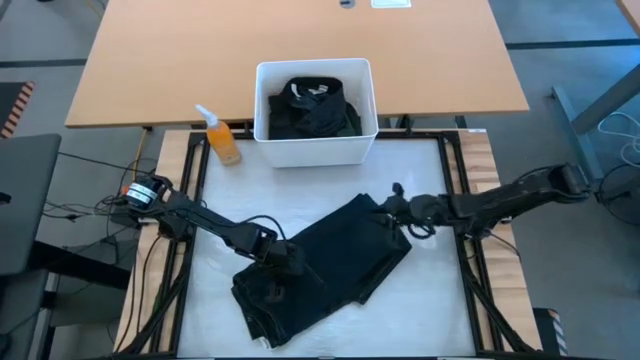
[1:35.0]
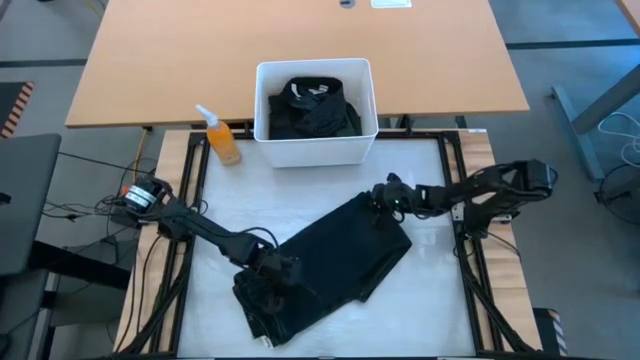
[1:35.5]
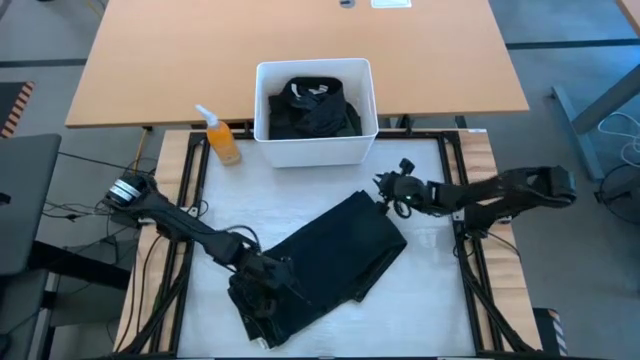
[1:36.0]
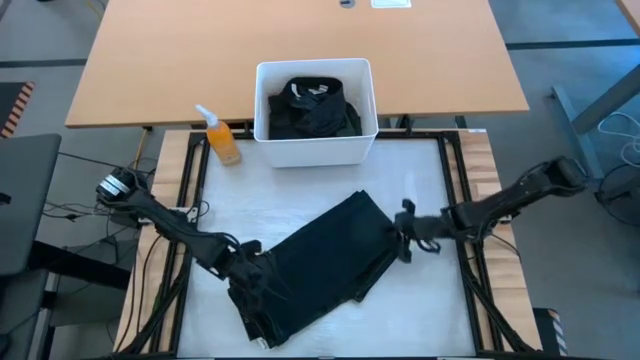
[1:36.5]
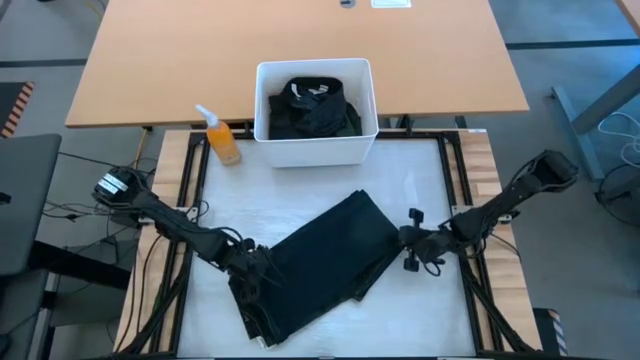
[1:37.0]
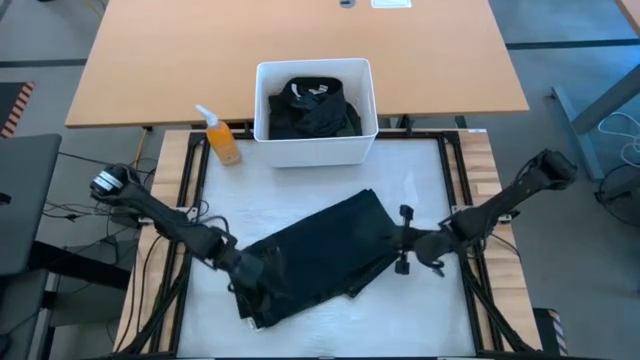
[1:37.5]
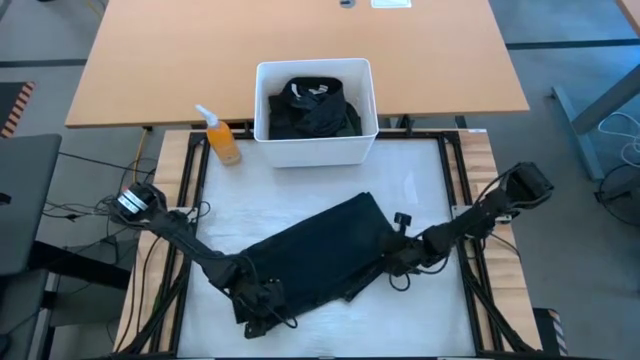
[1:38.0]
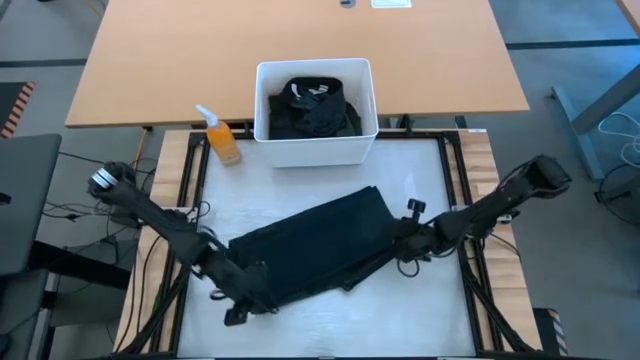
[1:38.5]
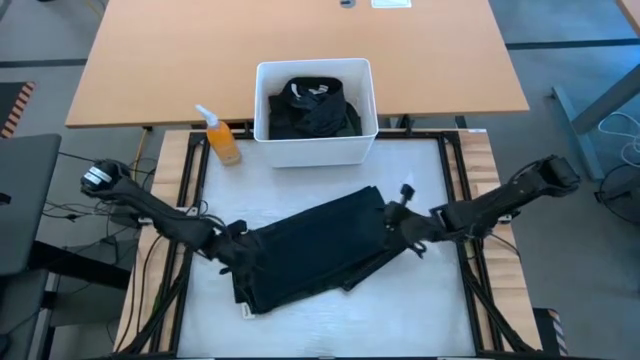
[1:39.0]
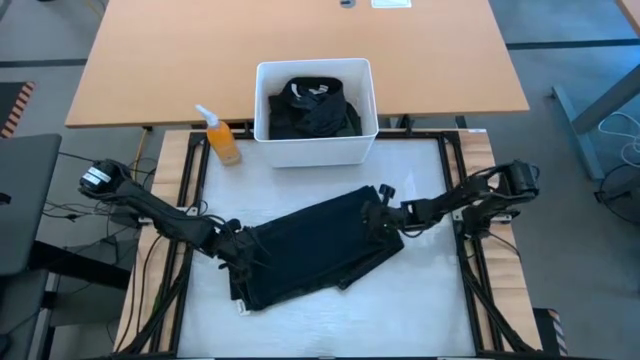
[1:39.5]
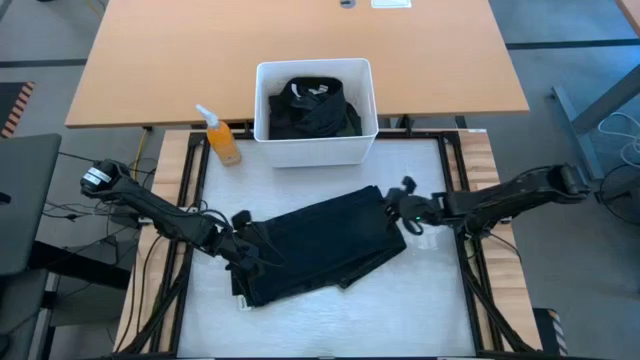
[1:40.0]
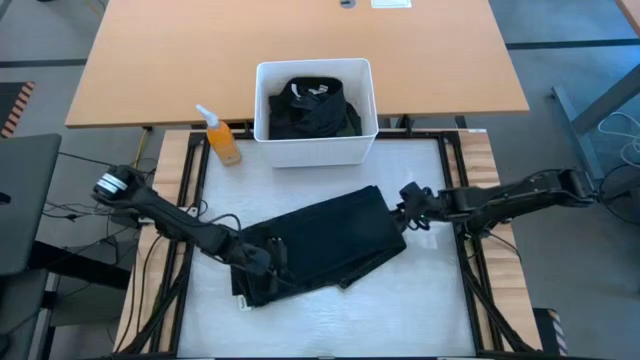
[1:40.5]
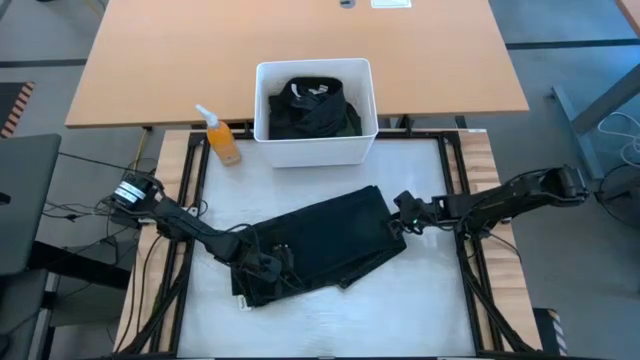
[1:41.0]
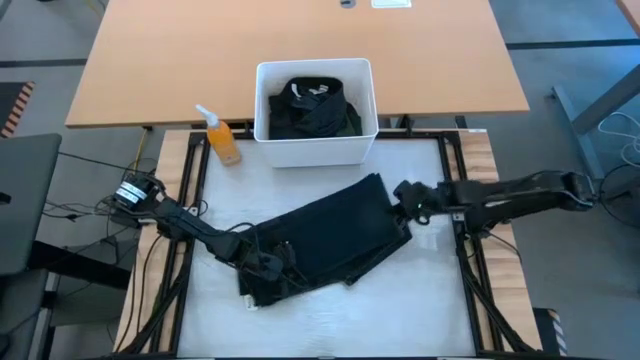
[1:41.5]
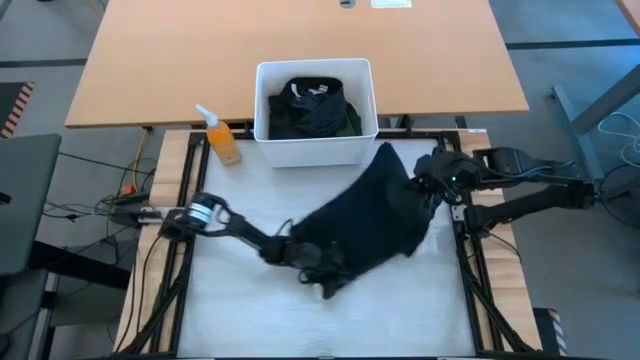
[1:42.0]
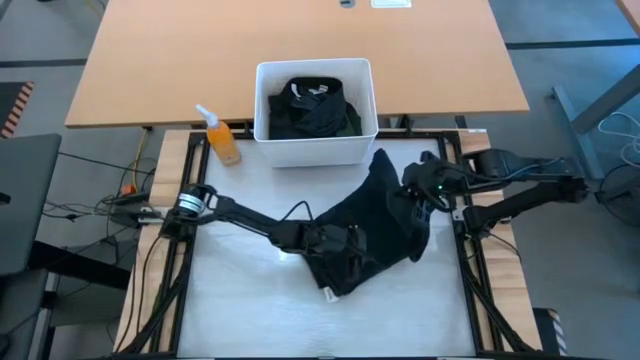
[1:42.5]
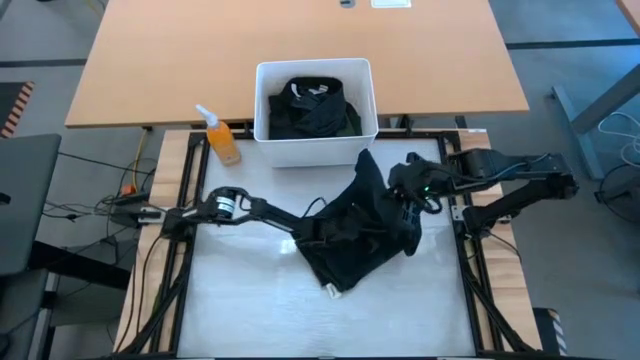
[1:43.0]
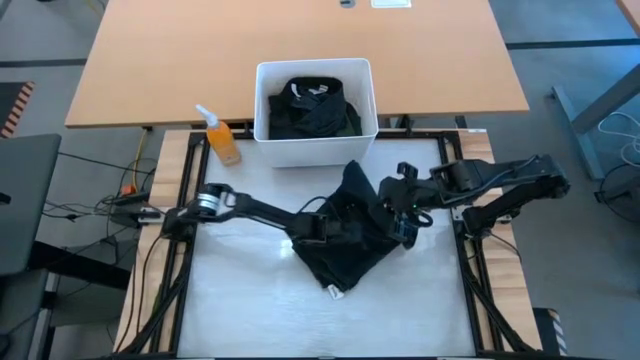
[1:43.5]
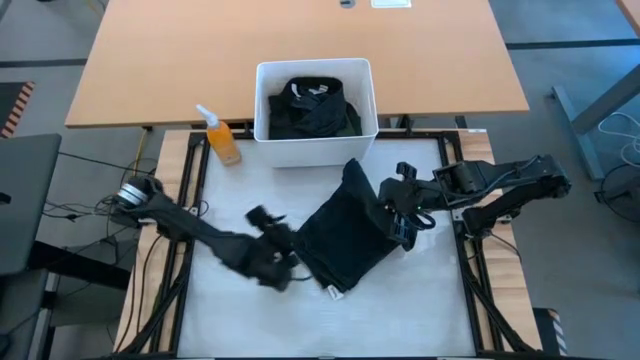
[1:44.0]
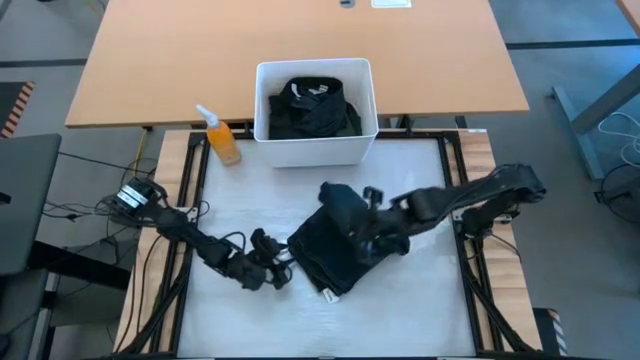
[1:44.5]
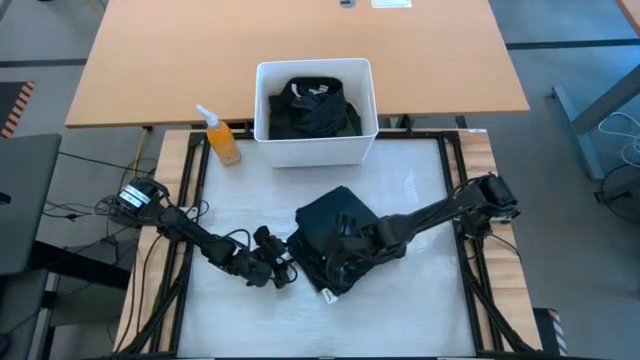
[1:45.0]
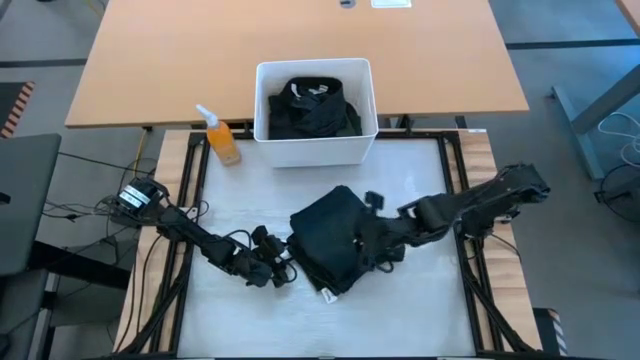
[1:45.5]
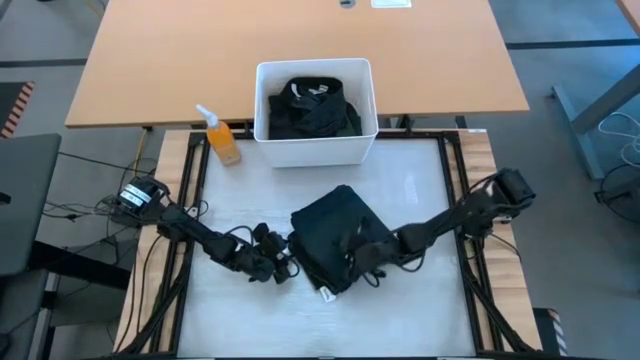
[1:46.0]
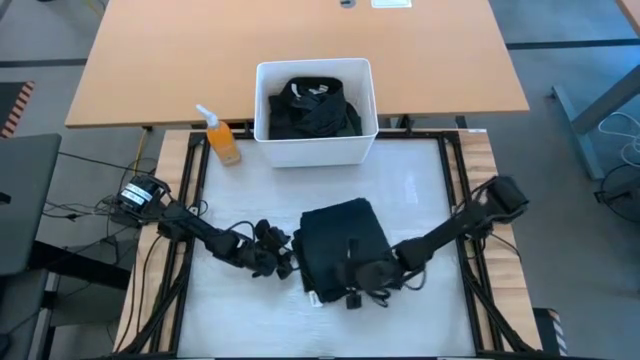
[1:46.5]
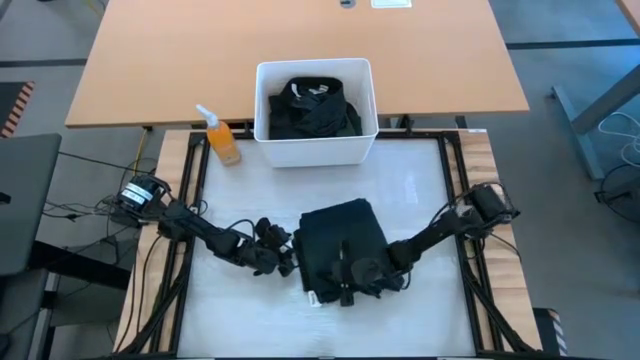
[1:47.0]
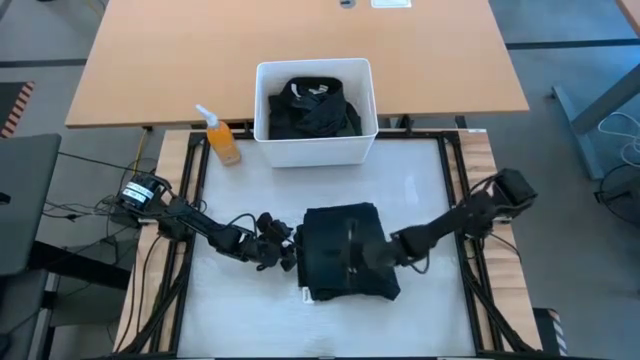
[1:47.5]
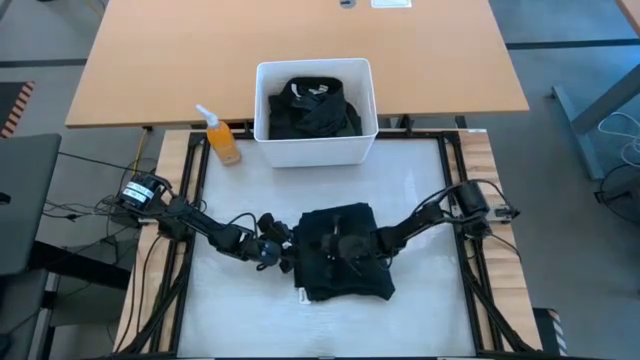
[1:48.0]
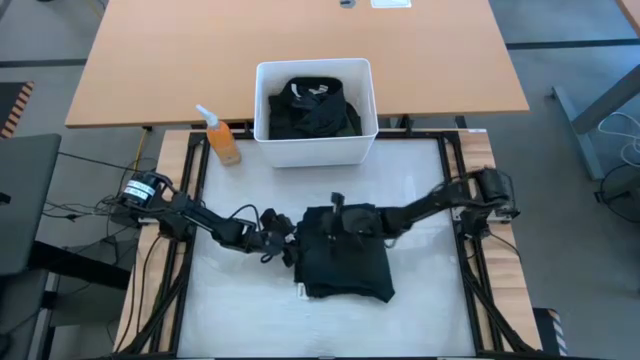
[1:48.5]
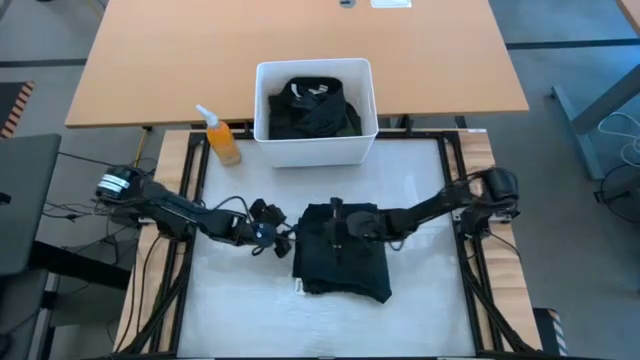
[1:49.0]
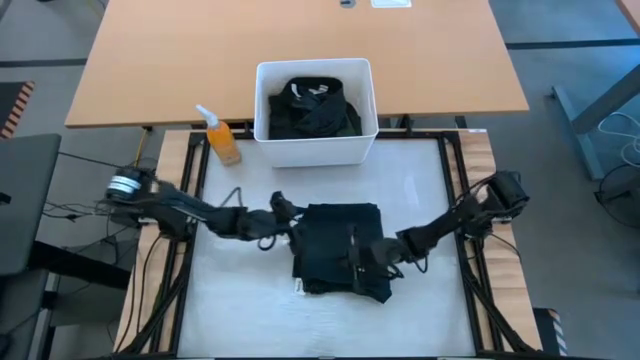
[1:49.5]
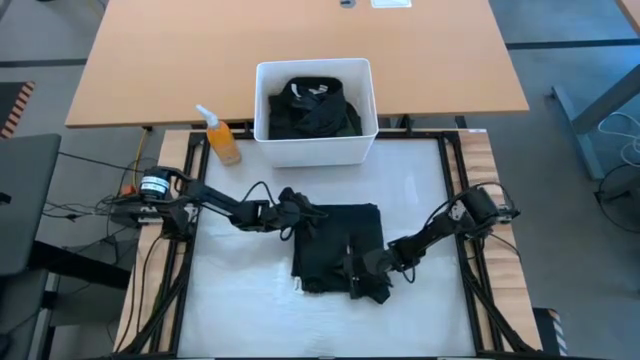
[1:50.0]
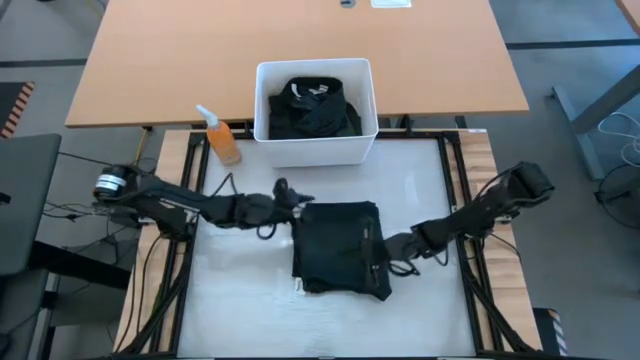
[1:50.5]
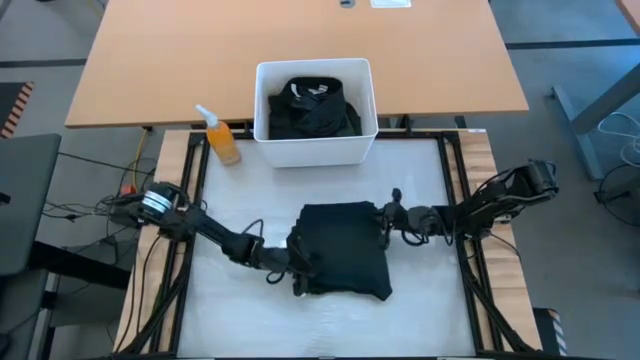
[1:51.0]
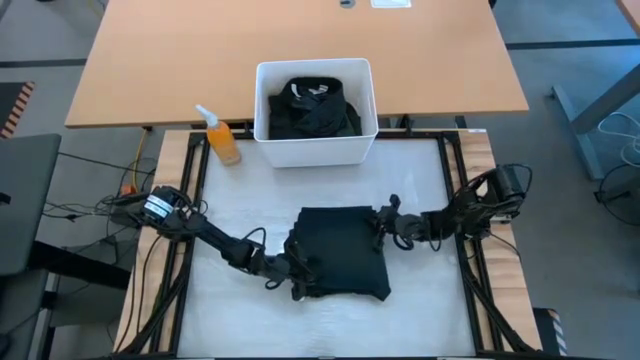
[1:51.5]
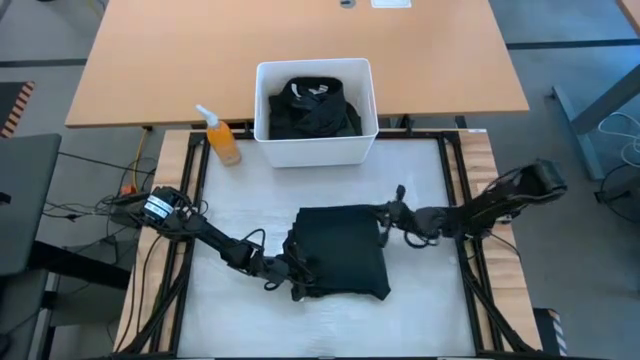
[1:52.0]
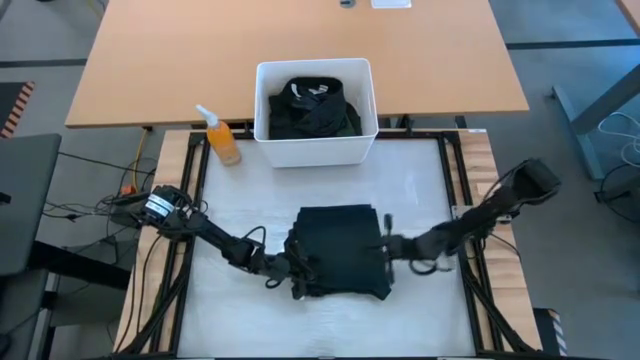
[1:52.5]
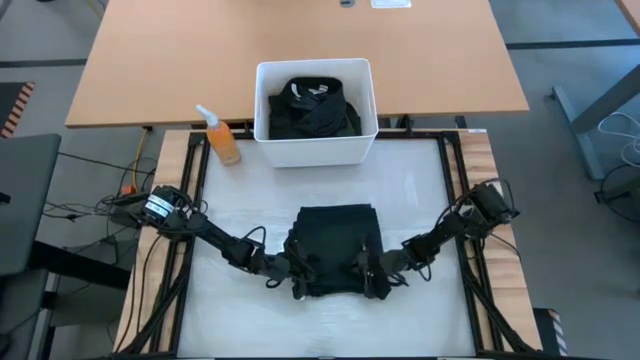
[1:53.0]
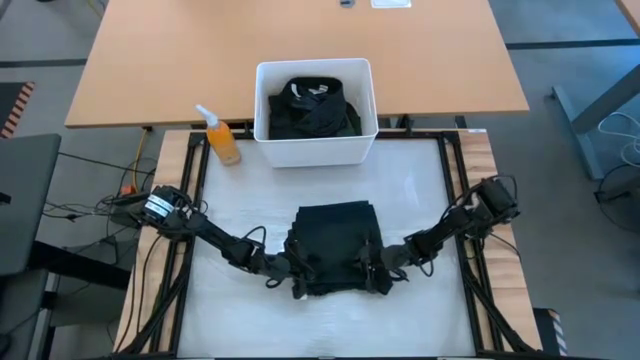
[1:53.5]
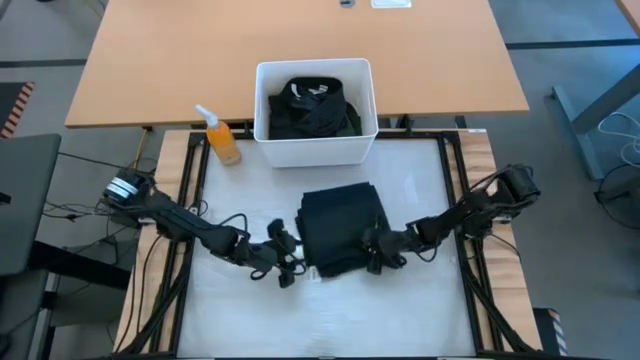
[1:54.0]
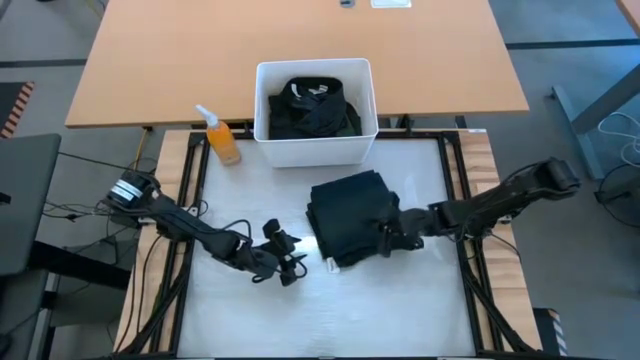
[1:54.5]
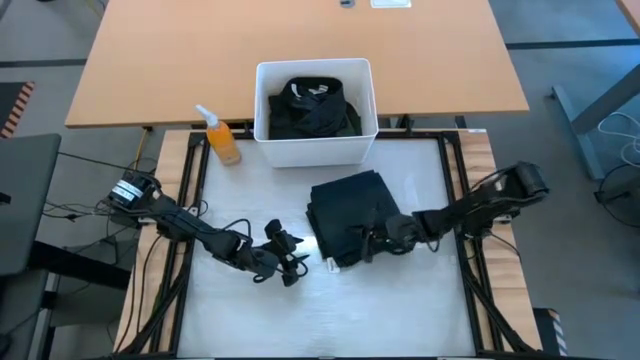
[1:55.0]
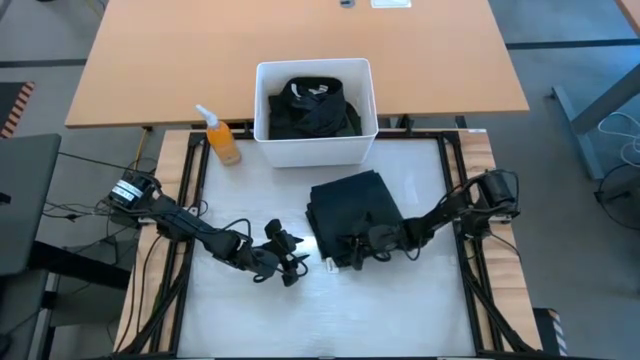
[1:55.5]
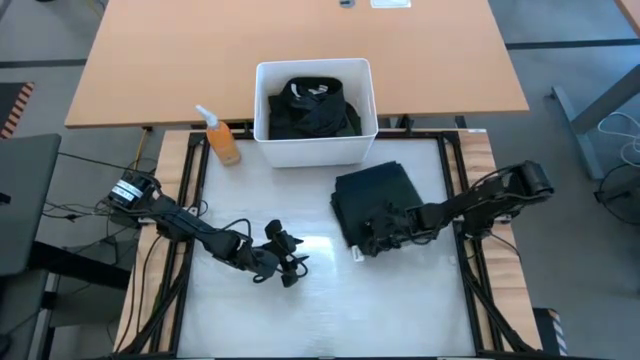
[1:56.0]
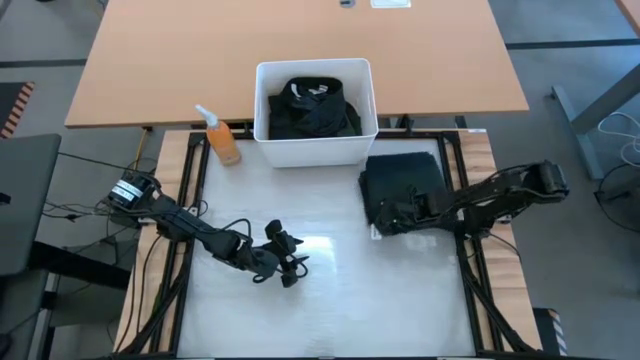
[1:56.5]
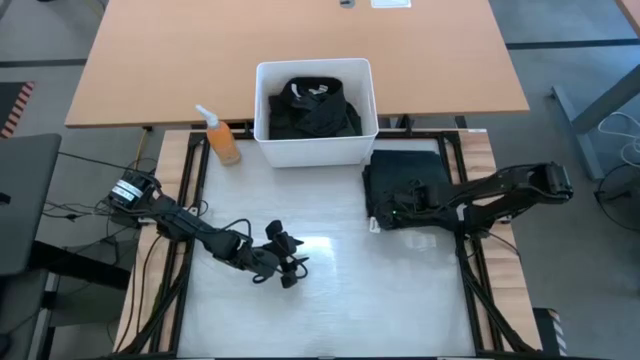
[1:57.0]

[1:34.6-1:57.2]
Task: Fold laundry
Fold the dark blue jeans from the white laundry organizer

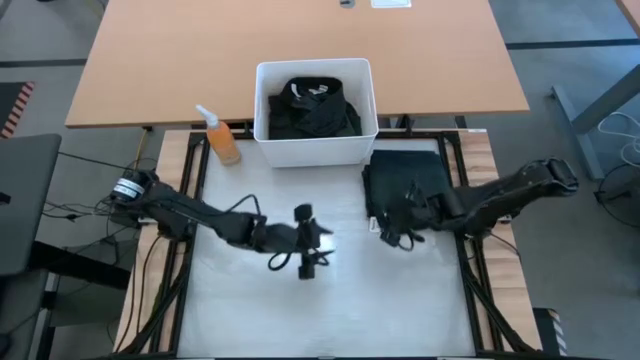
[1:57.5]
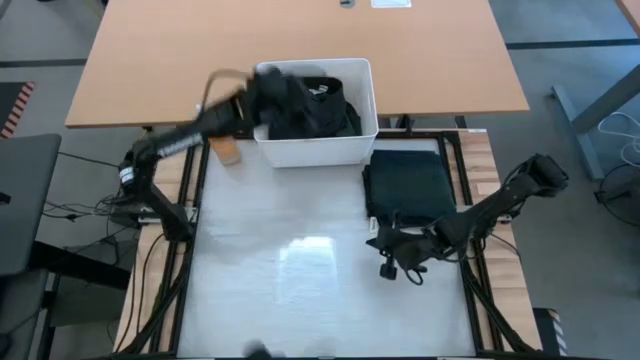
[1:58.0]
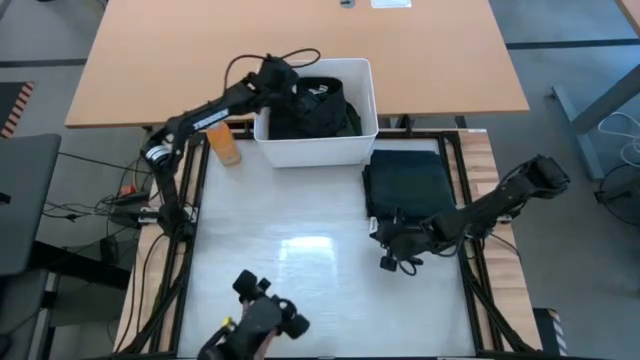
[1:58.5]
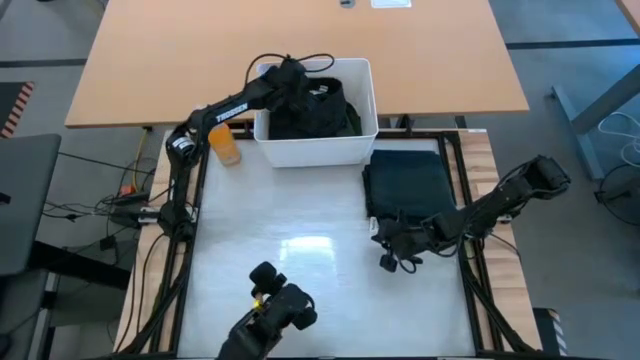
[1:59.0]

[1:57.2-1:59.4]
Fold the black shorts from the white laundry organizer
